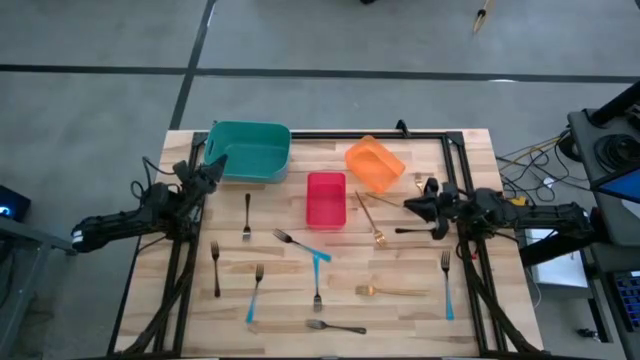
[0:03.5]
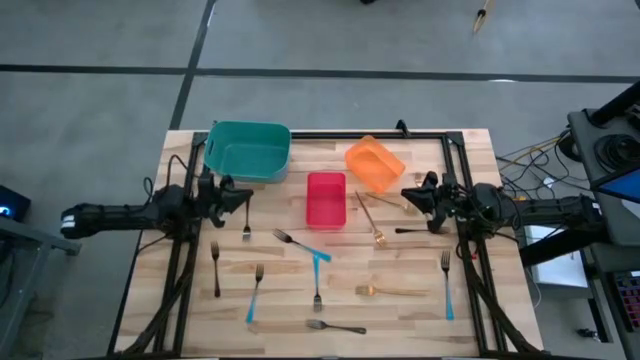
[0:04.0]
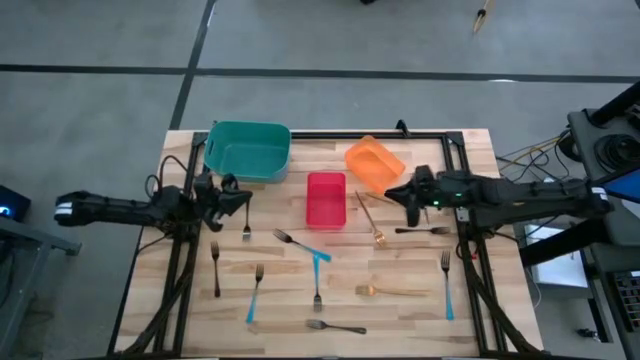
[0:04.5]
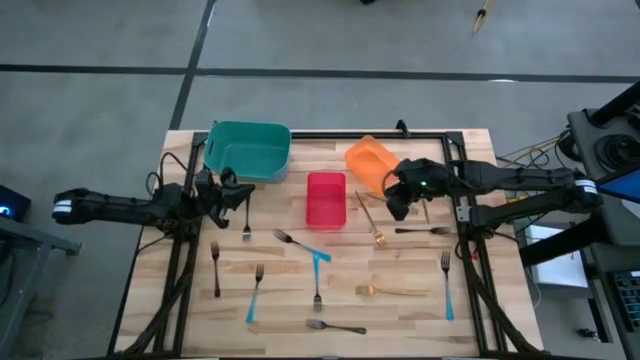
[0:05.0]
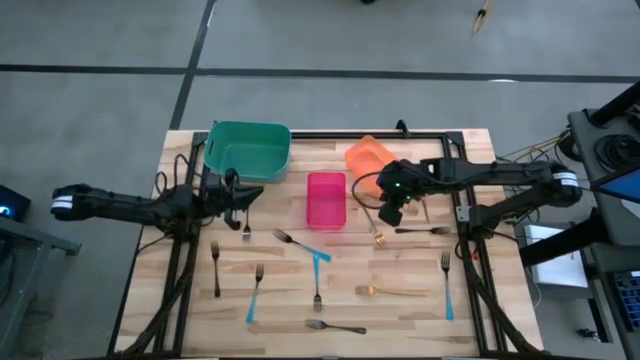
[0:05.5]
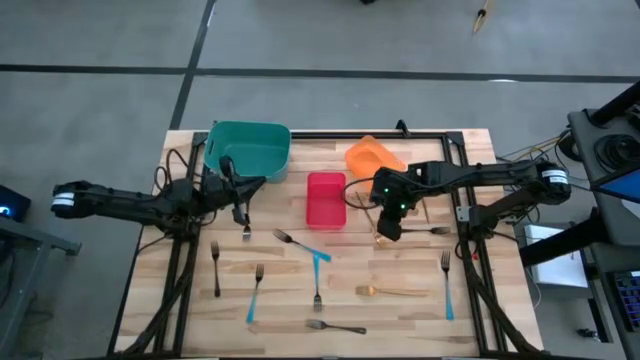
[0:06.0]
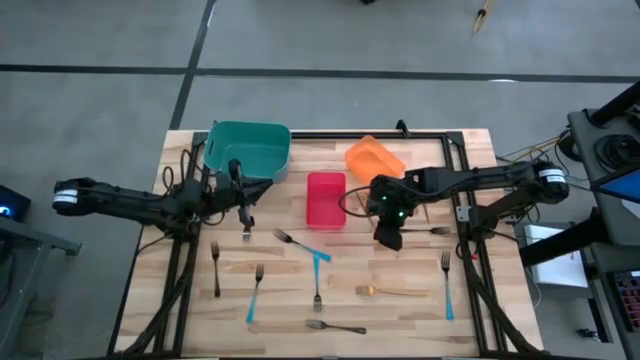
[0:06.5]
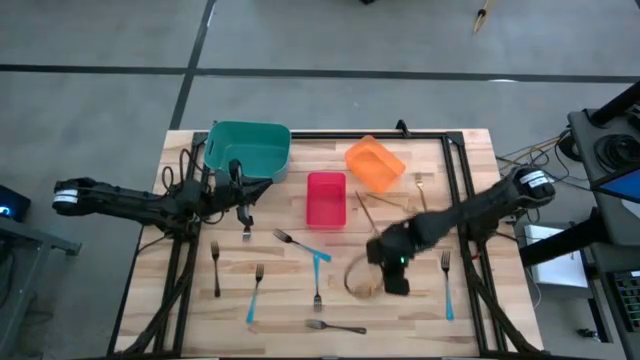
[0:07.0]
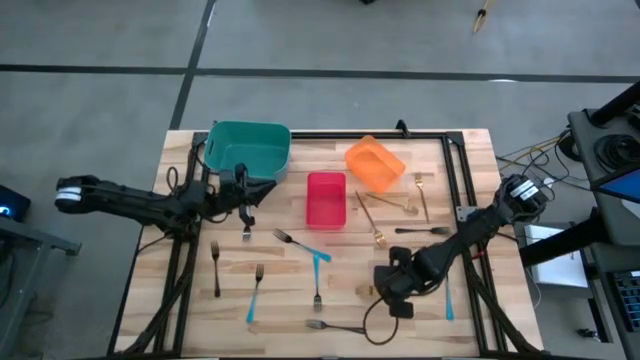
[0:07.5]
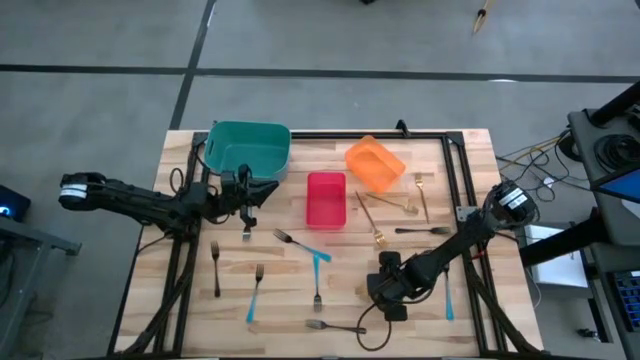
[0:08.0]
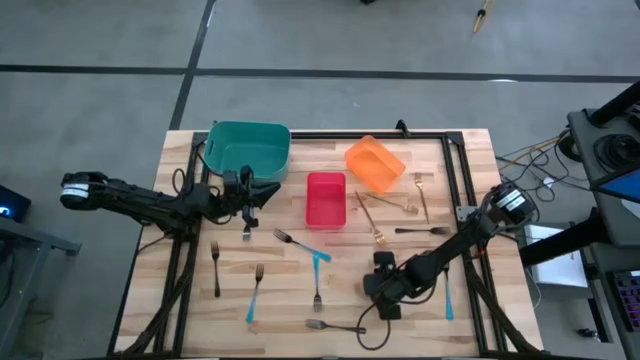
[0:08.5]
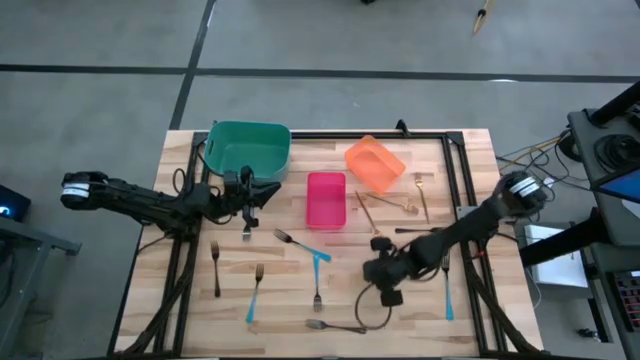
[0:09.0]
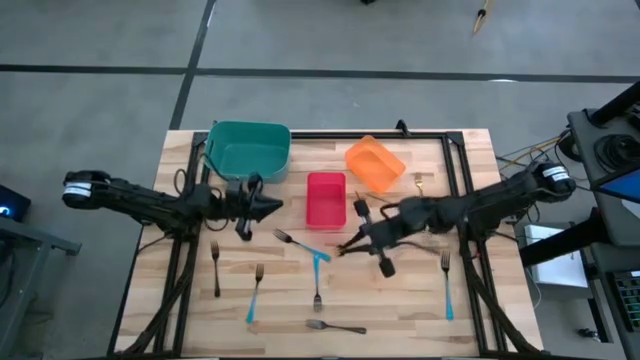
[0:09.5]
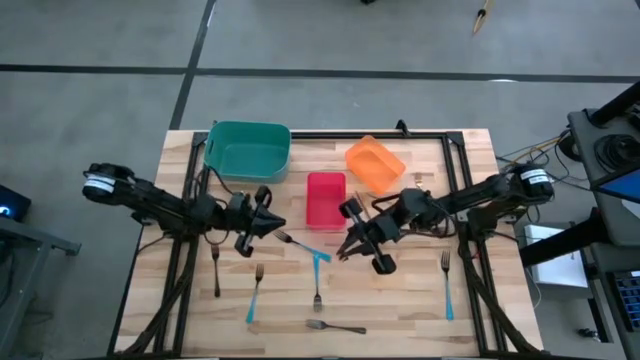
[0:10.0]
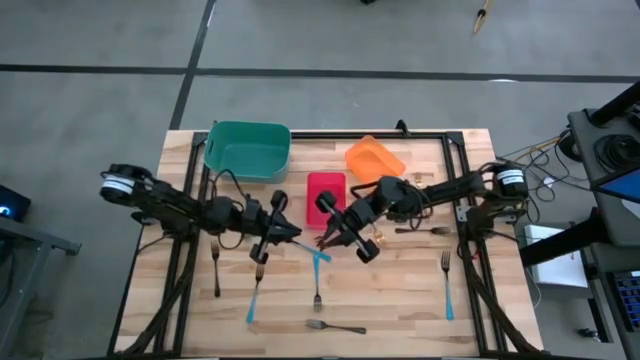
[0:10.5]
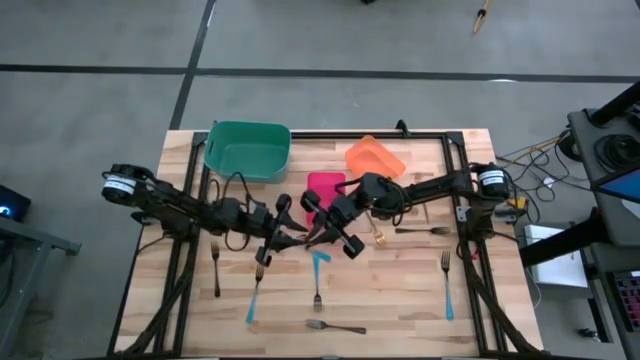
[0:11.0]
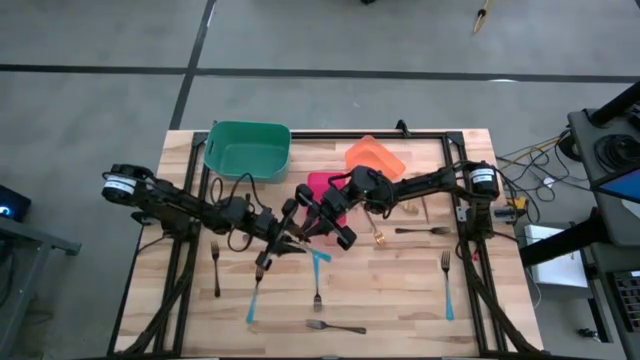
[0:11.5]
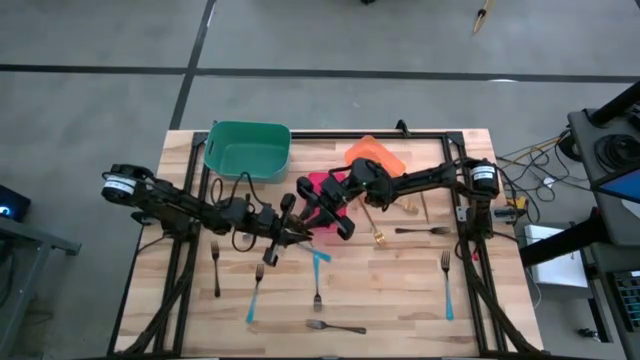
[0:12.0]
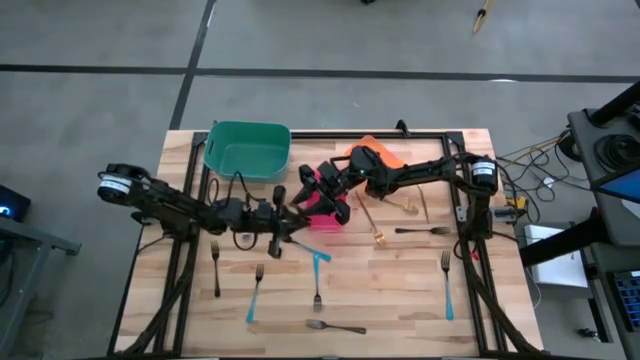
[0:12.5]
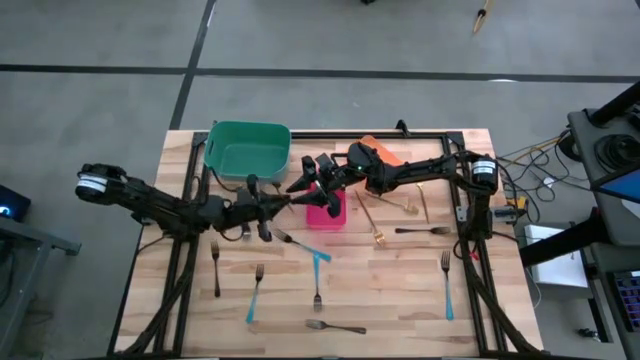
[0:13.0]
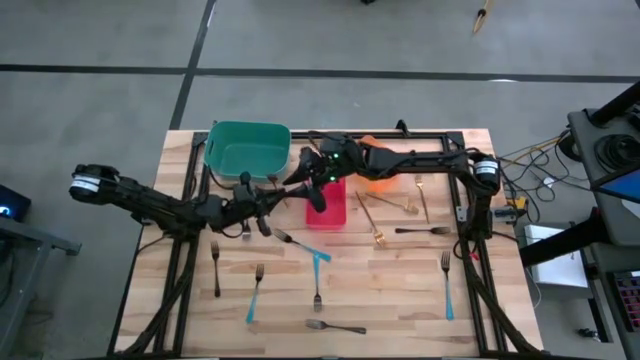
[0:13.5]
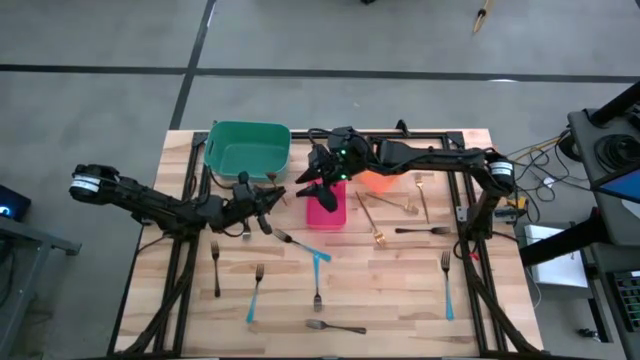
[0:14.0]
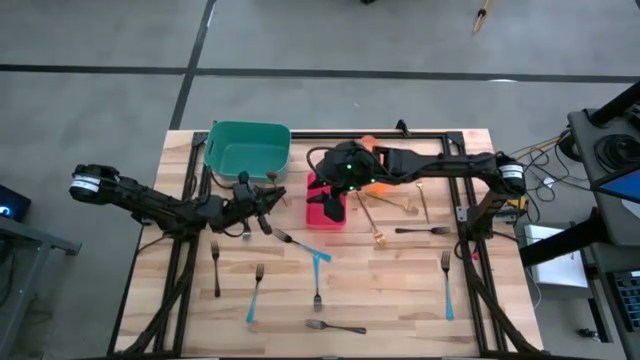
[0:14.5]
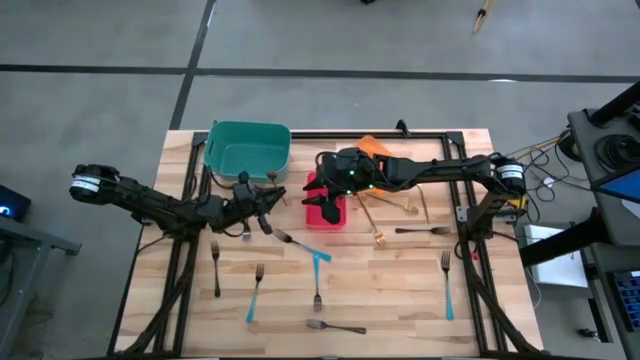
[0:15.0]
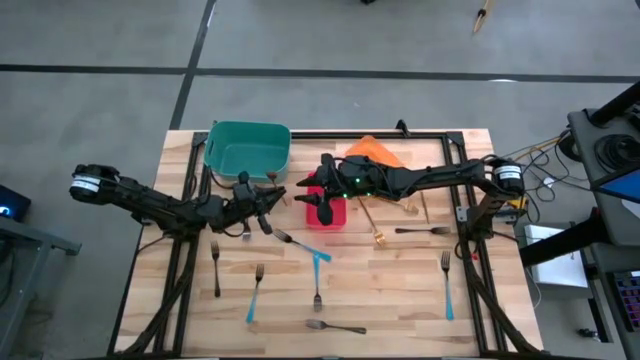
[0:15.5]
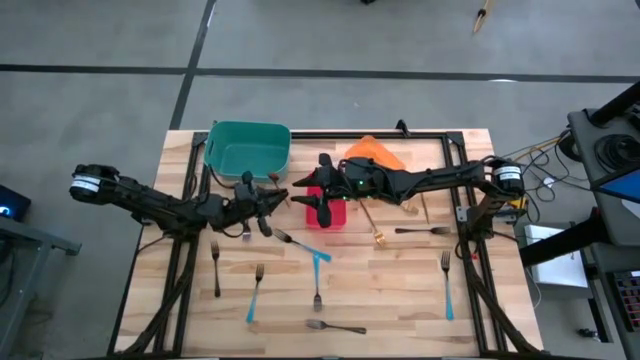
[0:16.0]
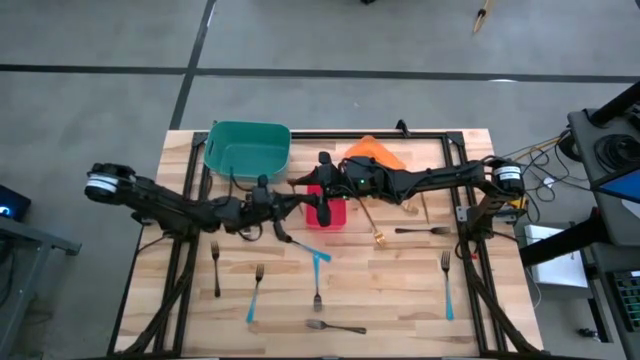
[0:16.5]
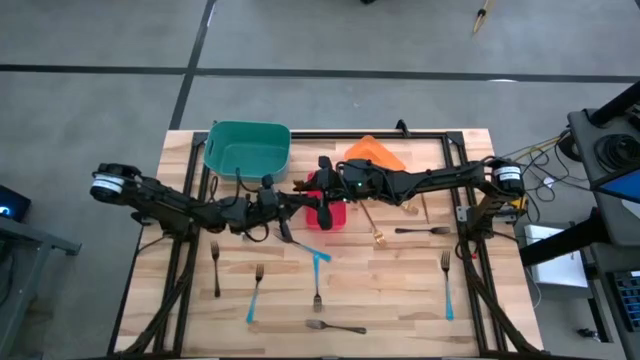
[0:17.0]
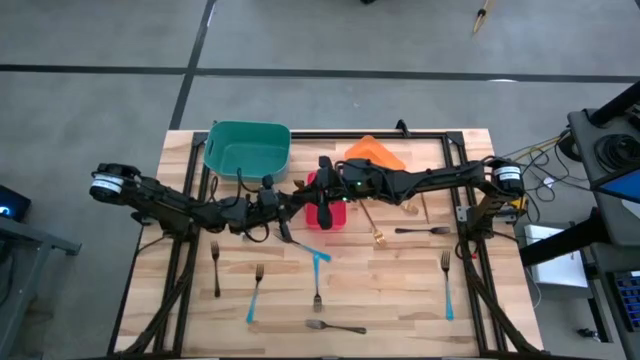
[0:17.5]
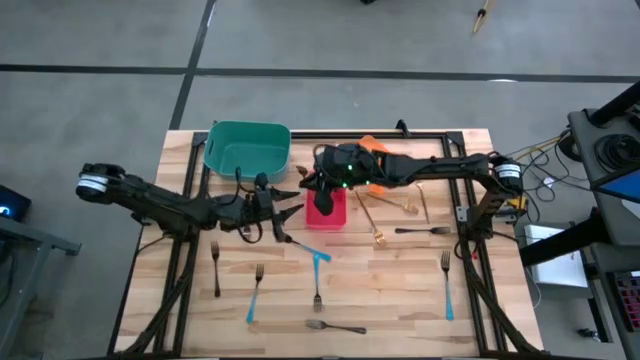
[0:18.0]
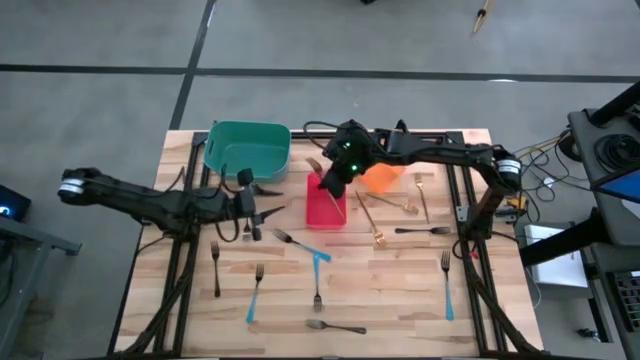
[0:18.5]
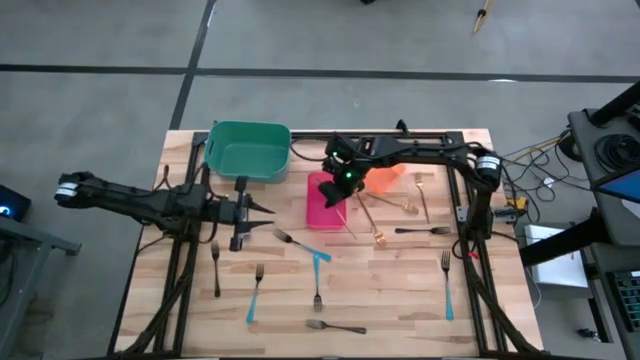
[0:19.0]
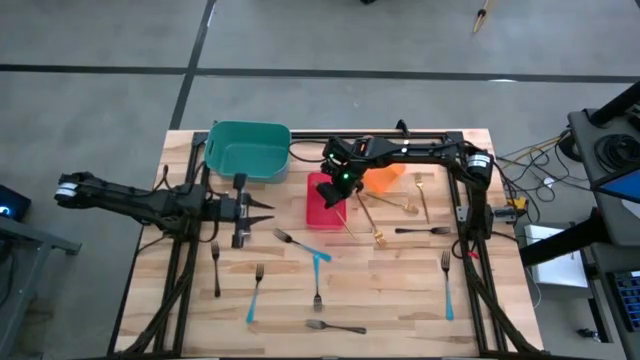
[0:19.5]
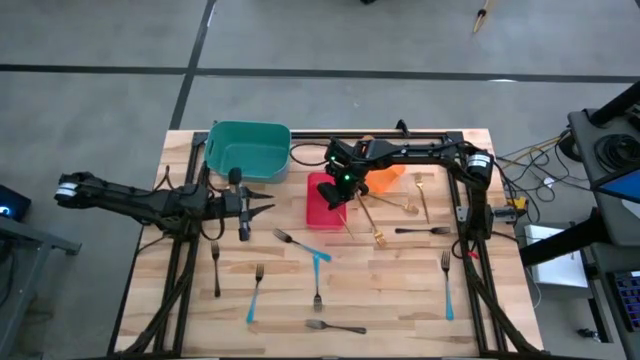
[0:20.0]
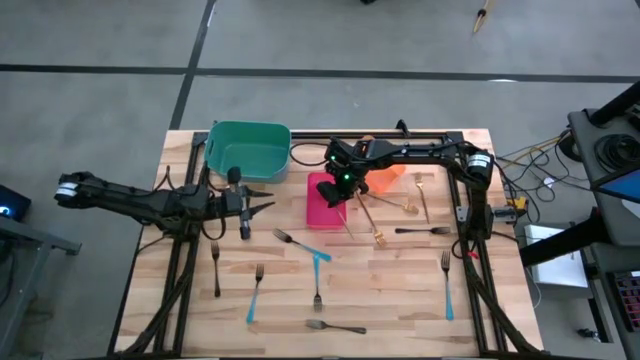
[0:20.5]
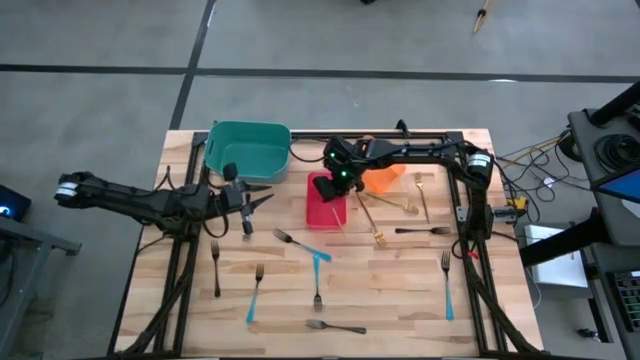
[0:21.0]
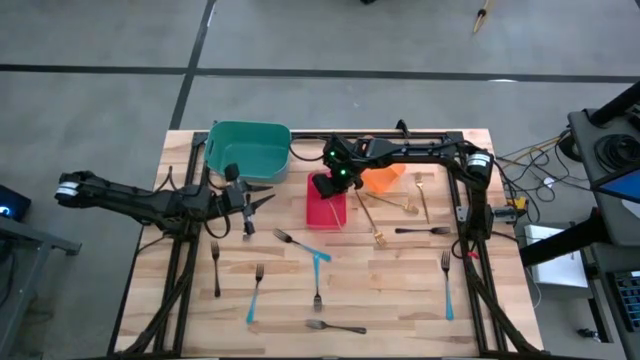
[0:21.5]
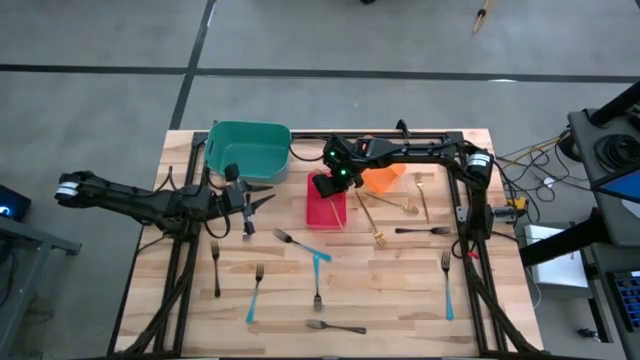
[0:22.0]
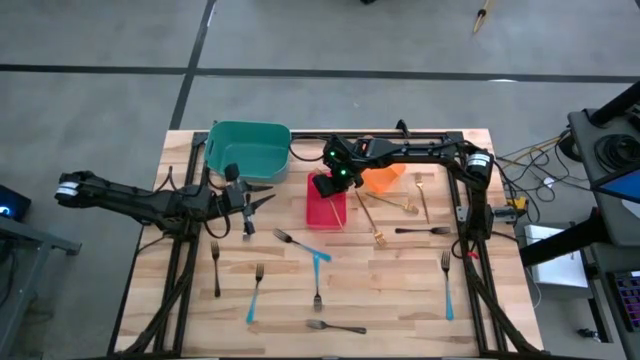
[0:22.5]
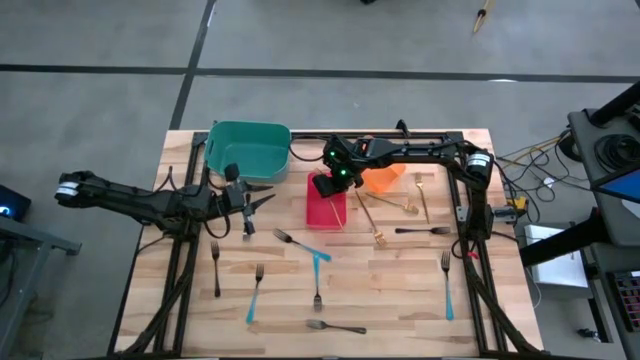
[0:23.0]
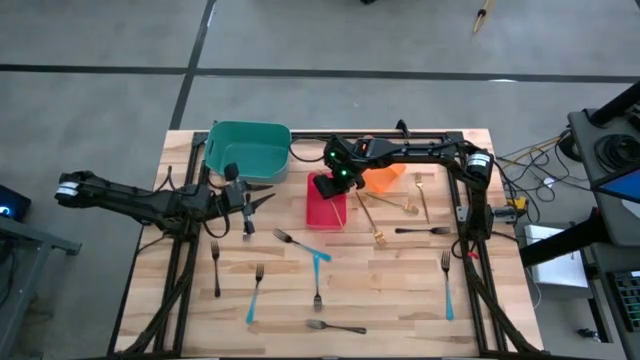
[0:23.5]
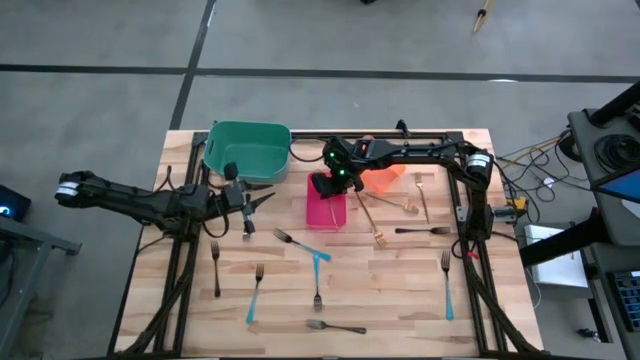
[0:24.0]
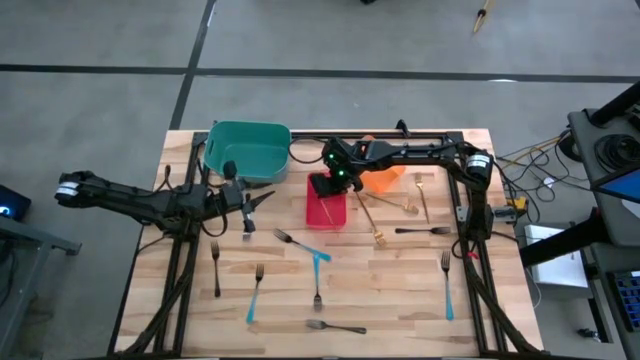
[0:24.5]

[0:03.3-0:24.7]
Task: Sort silverware by color (type)
Put the golden fork into the red bin
